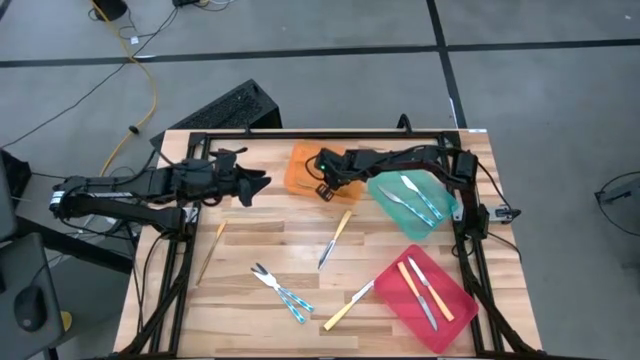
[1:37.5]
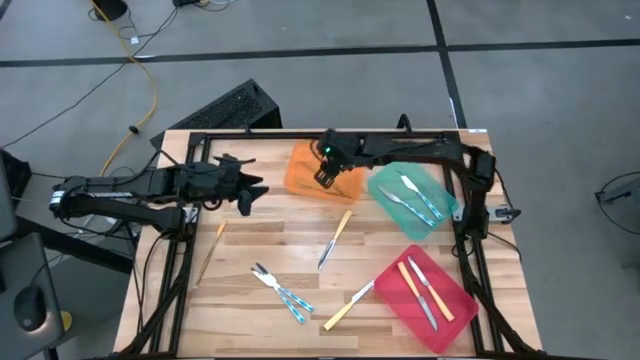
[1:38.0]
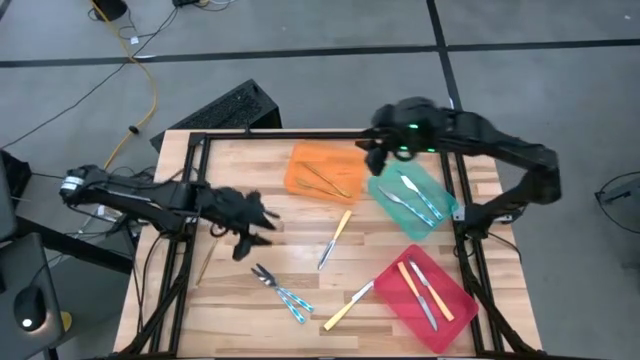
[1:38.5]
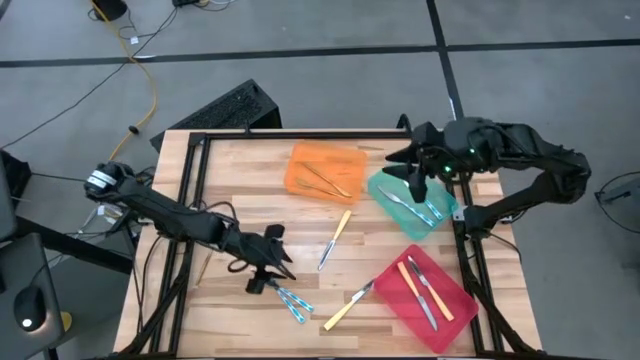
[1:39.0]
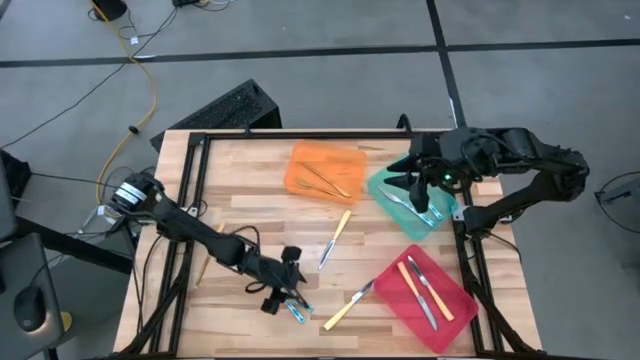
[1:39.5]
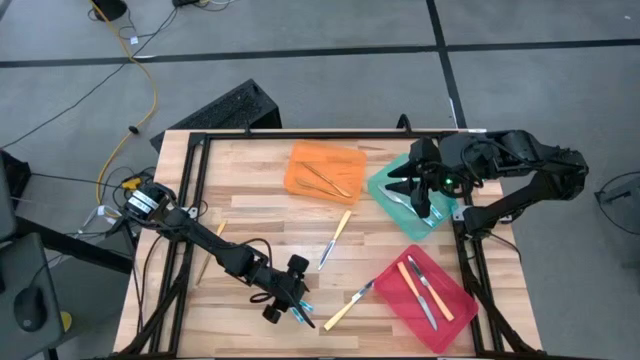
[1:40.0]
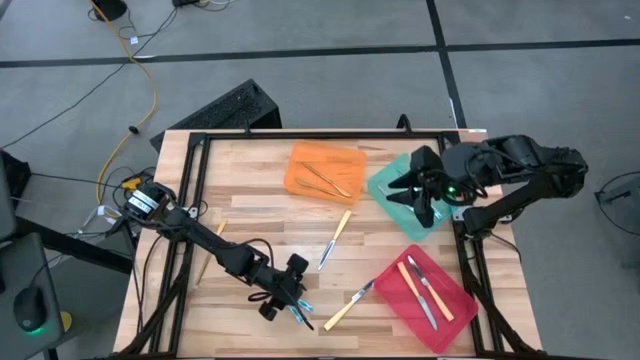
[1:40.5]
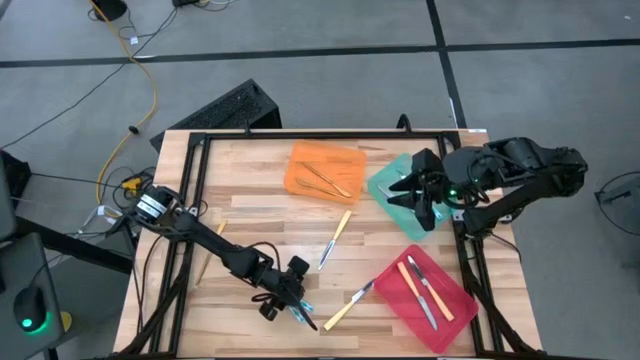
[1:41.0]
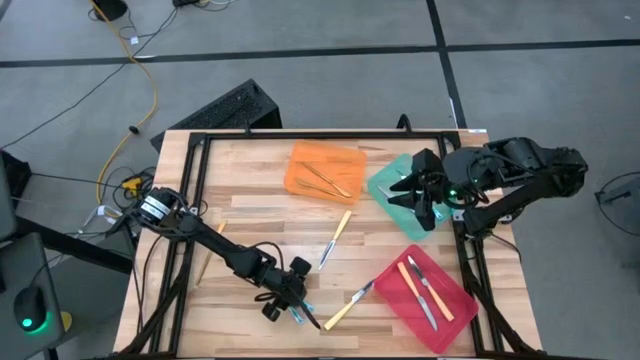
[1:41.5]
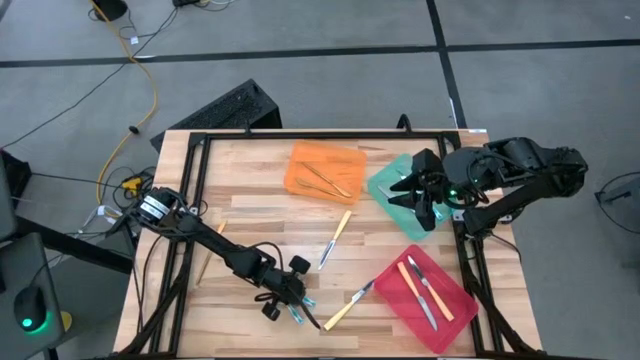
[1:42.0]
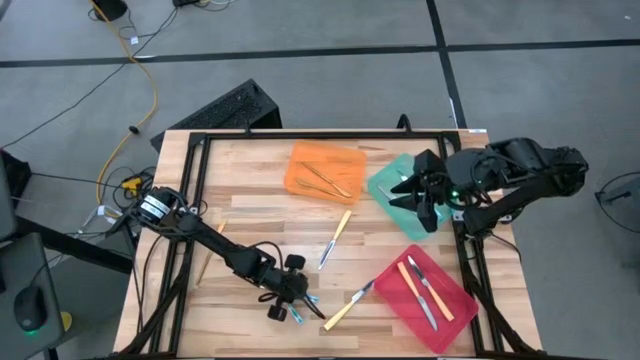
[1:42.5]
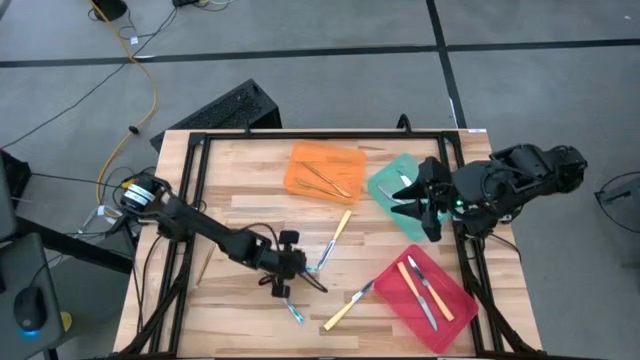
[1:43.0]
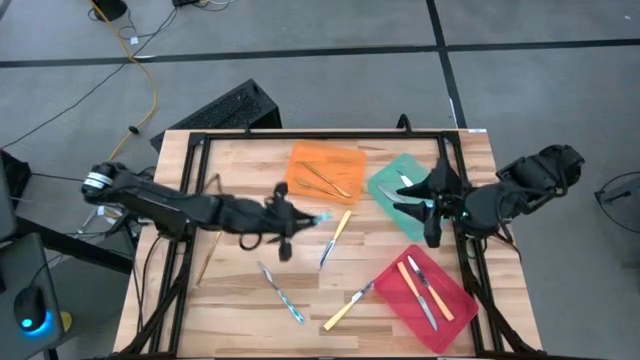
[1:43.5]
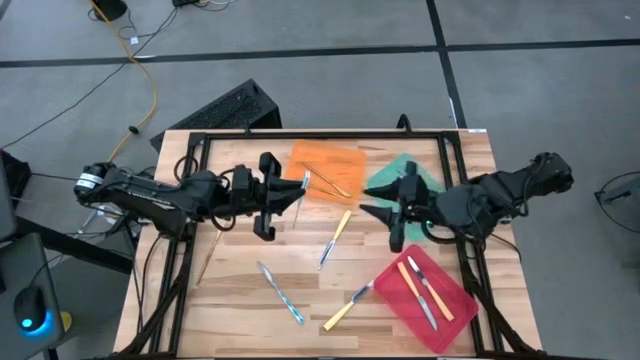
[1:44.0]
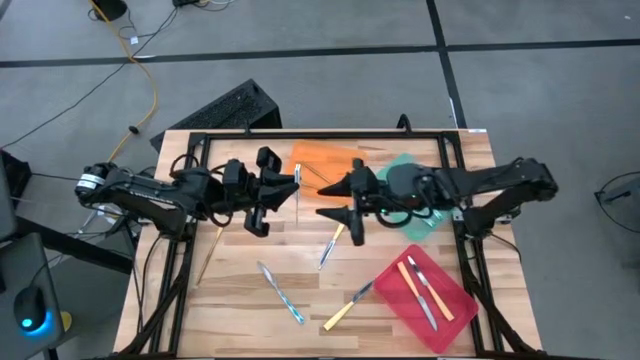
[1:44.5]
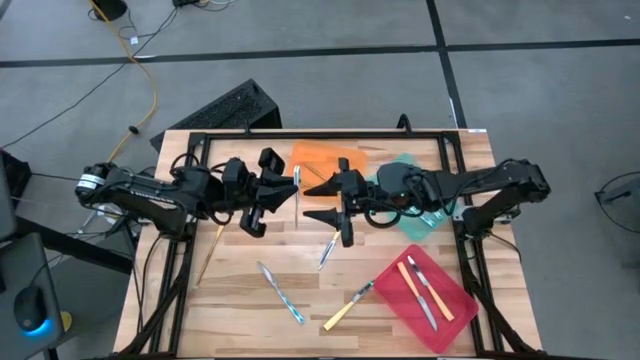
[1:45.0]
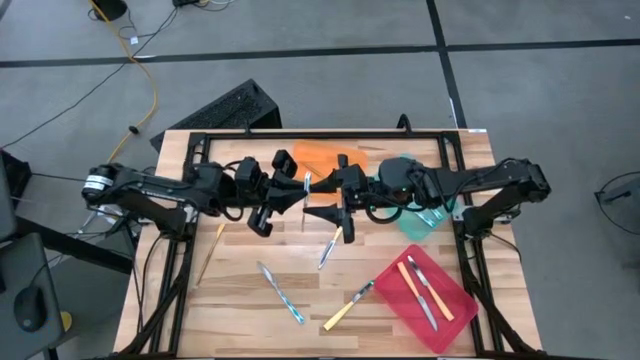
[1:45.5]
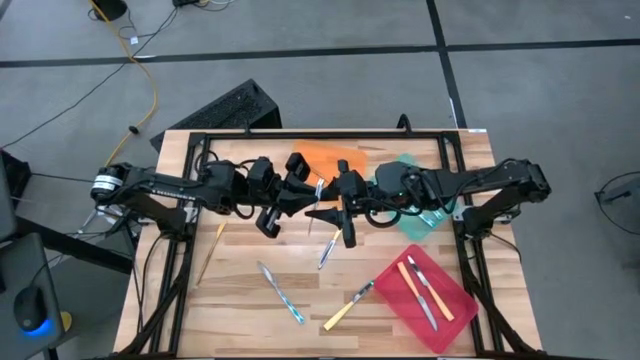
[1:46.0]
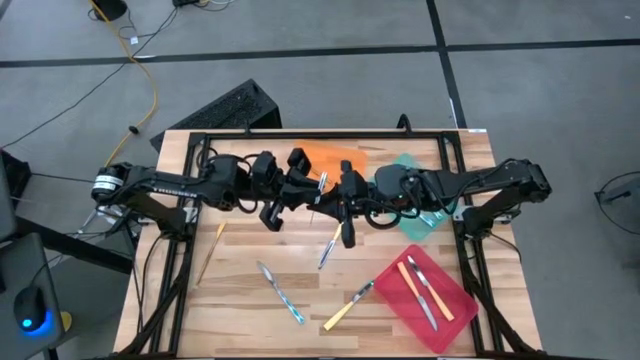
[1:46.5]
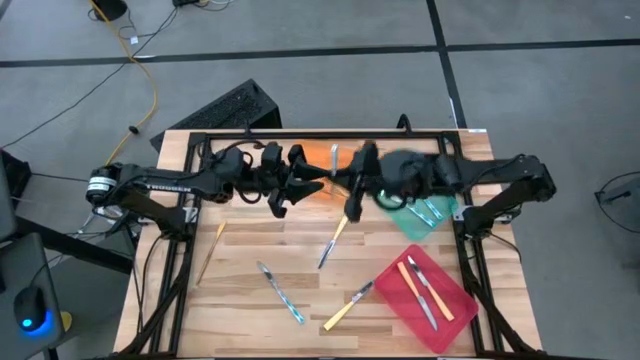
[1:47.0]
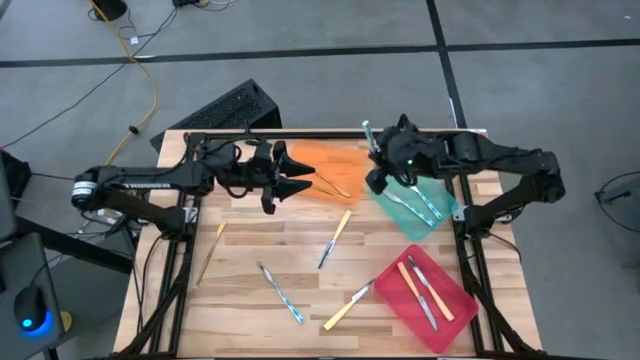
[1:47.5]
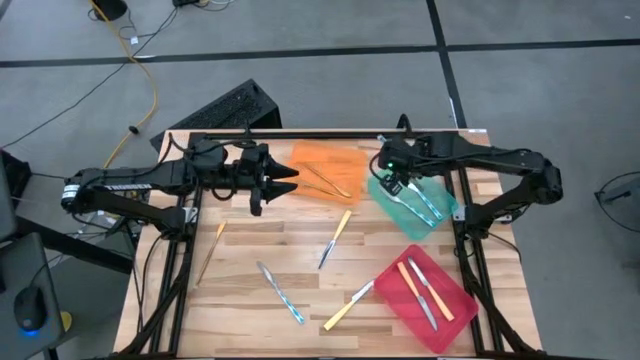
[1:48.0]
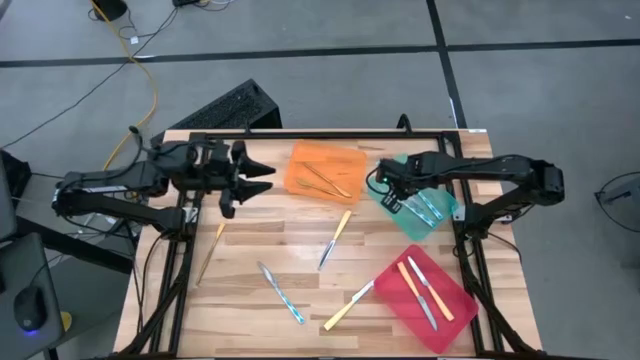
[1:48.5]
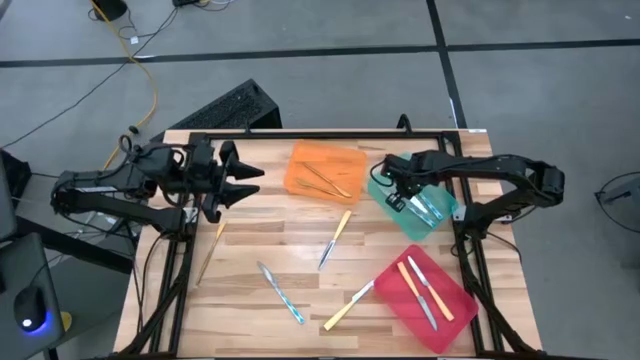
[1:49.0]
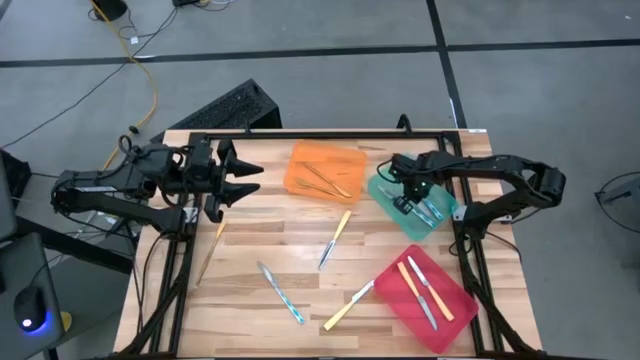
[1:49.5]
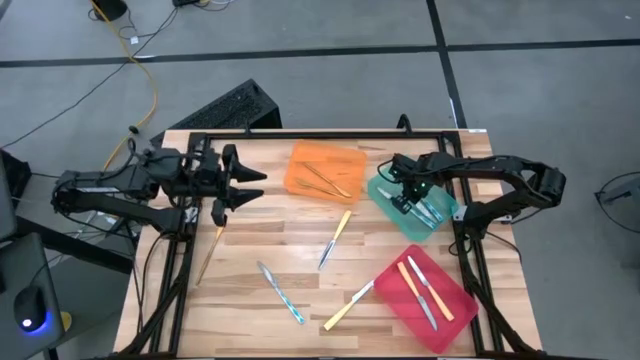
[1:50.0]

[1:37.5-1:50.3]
Task: Sort silverware by color (type)
Put the top white patterned knife into the blue bin

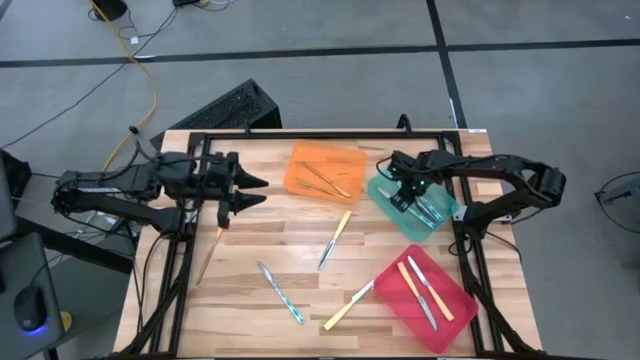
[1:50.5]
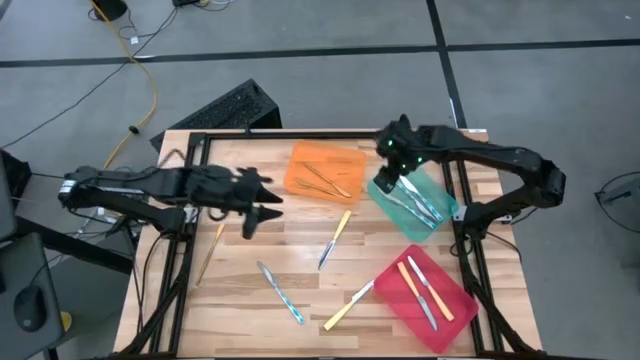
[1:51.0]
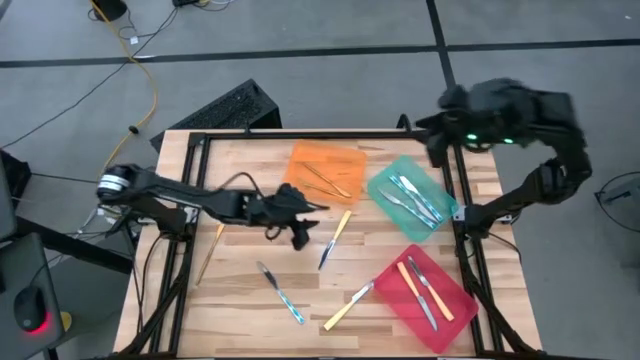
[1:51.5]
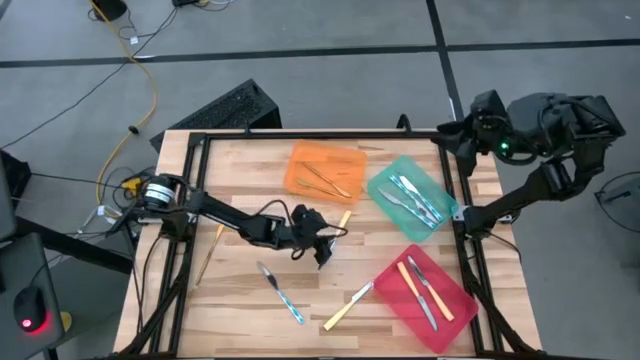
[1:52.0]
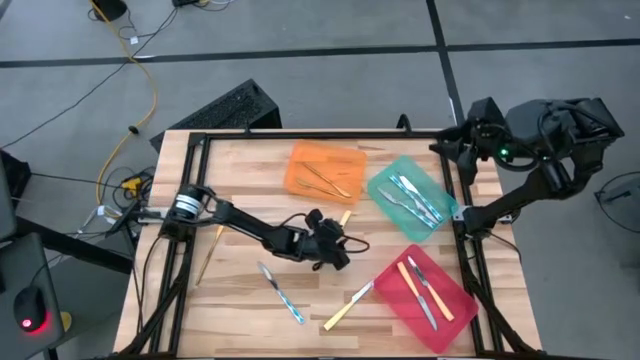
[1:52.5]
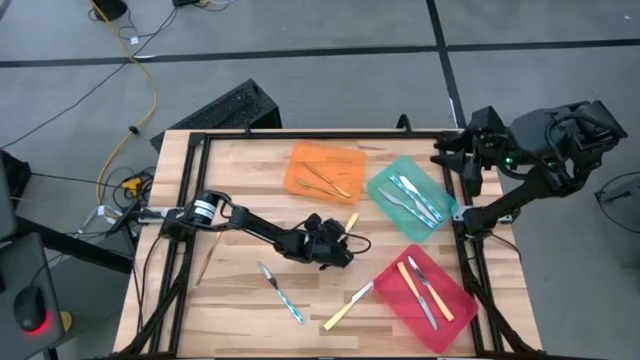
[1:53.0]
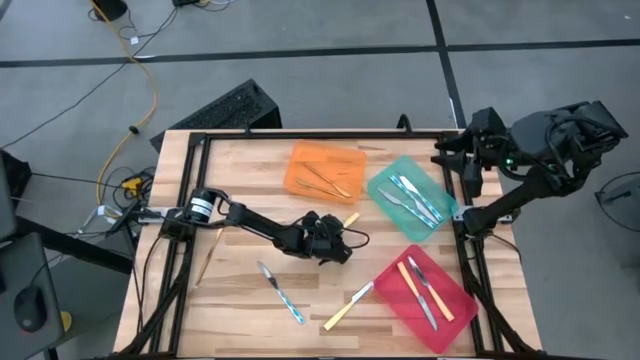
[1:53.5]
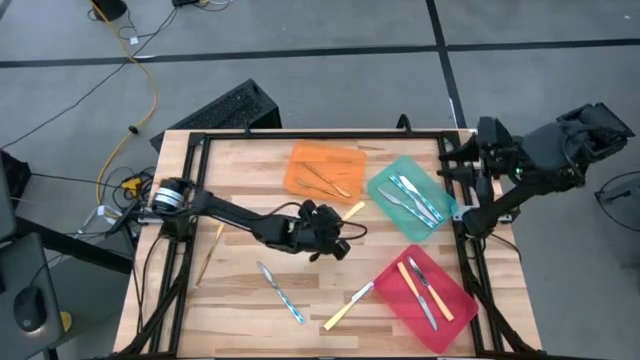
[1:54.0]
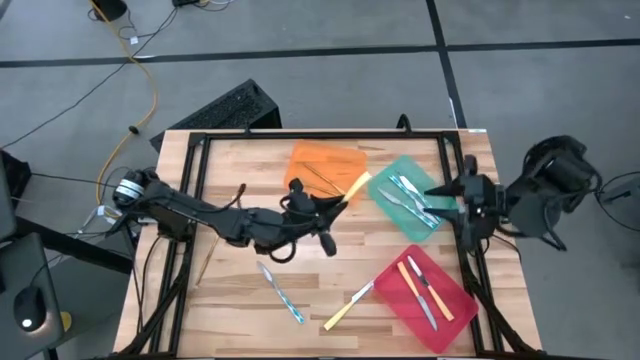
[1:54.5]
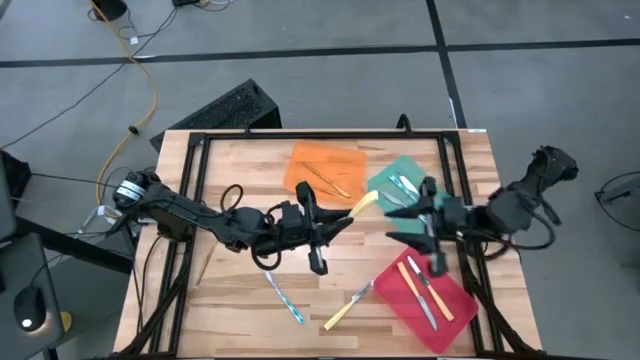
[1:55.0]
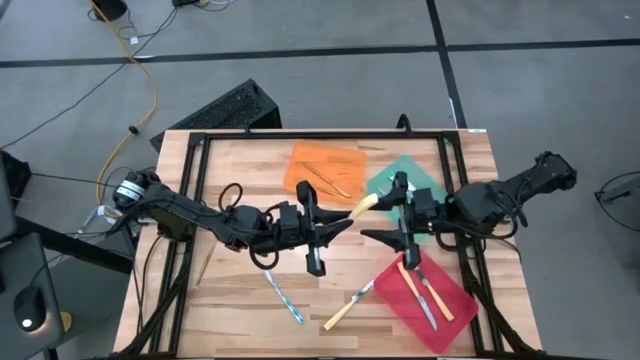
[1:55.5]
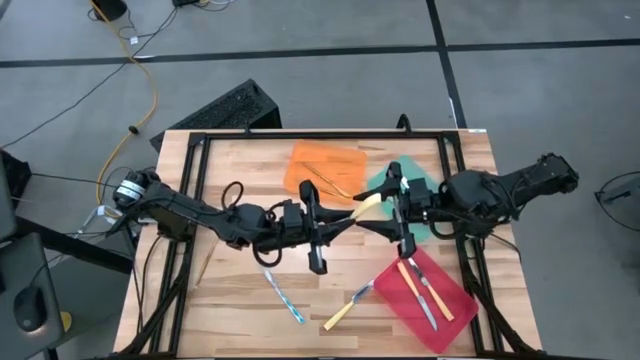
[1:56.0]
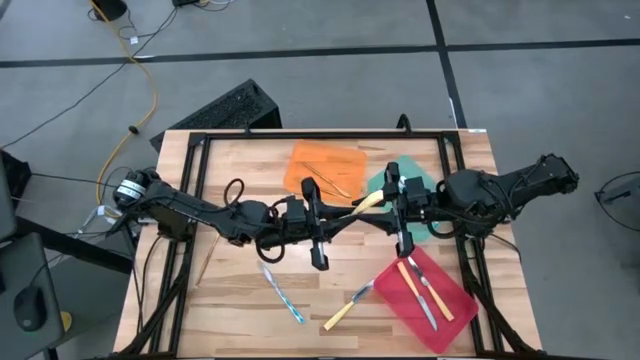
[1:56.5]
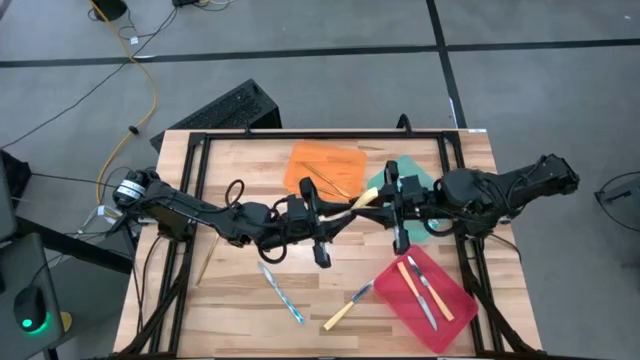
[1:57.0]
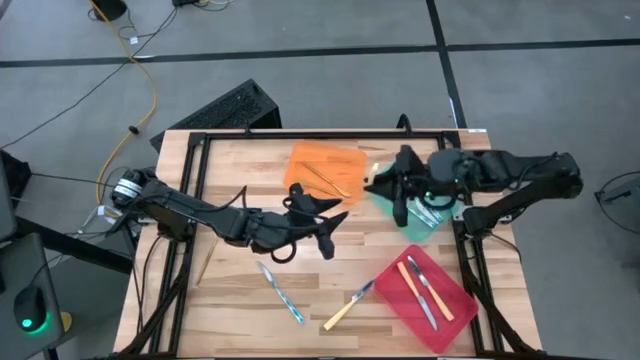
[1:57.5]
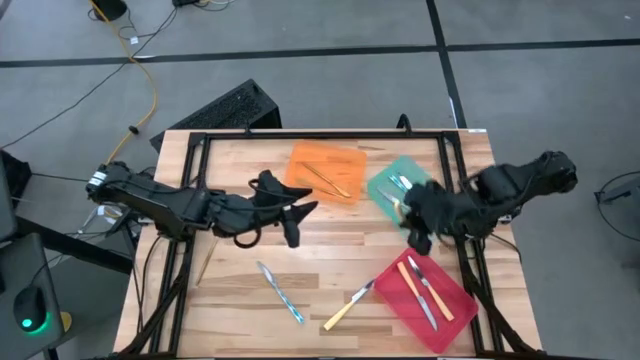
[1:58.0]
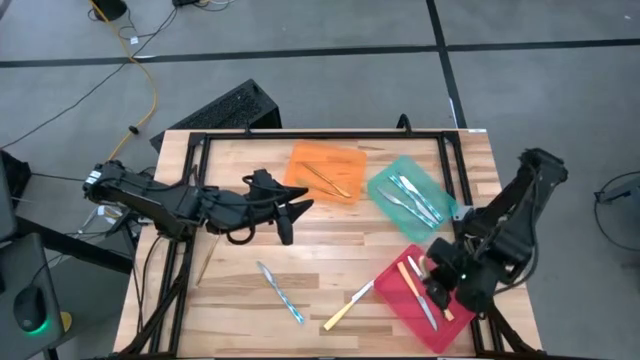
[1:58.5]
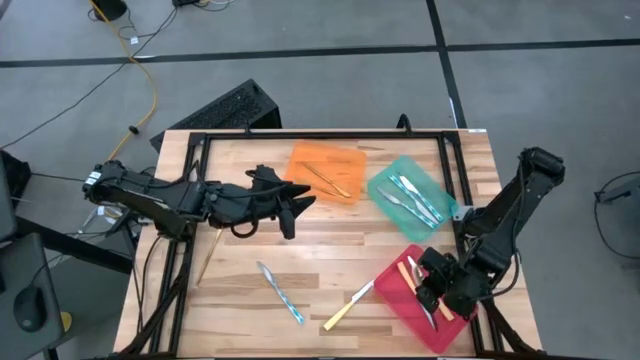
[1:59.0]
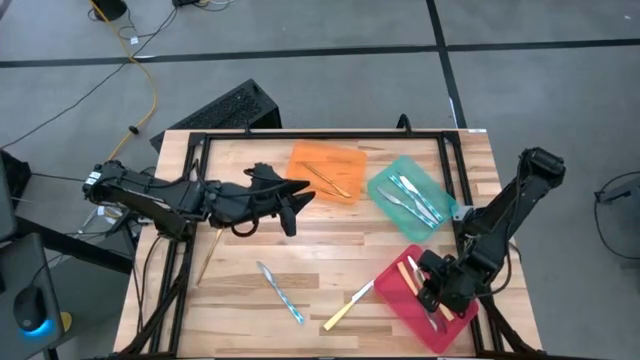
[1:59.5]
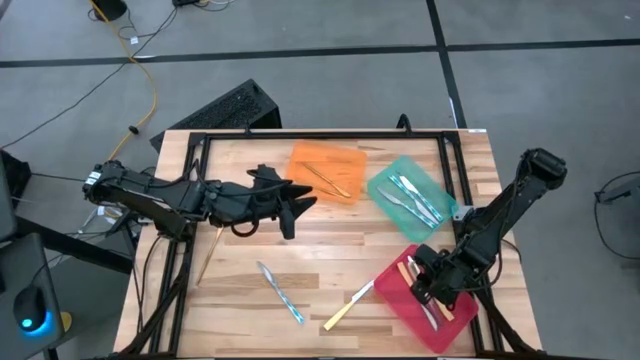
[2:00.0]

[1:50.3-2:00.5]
Put the top yellow knife into the red bin
